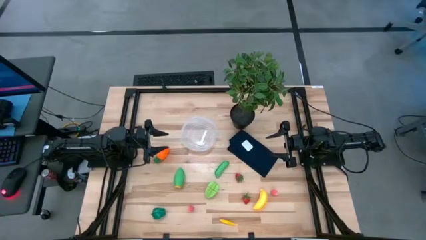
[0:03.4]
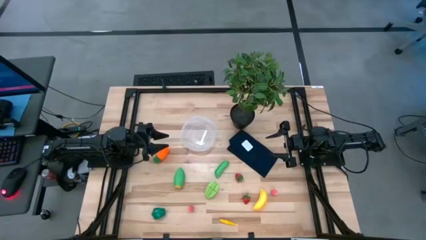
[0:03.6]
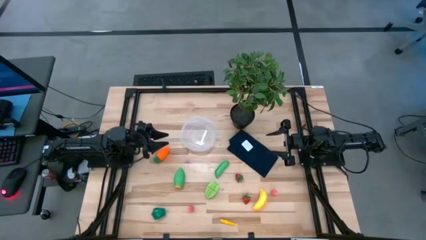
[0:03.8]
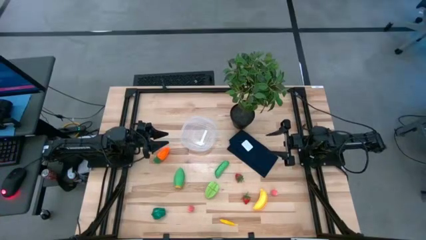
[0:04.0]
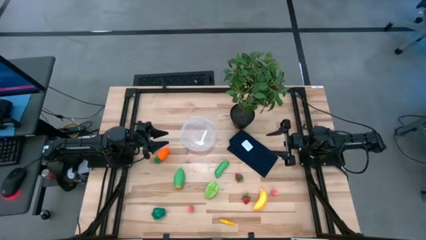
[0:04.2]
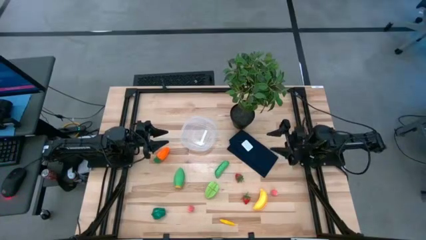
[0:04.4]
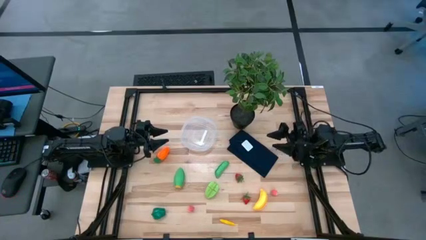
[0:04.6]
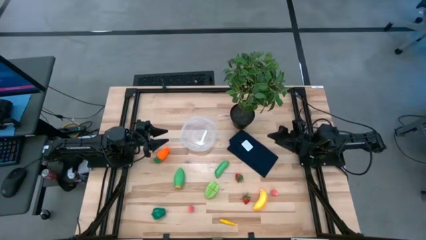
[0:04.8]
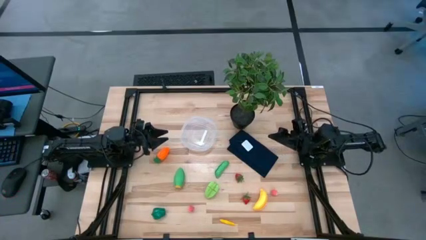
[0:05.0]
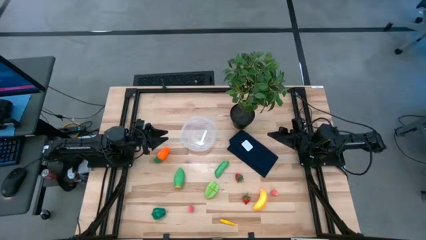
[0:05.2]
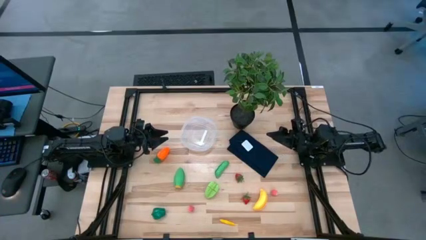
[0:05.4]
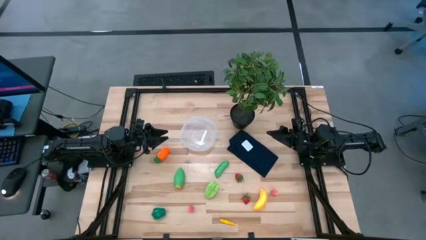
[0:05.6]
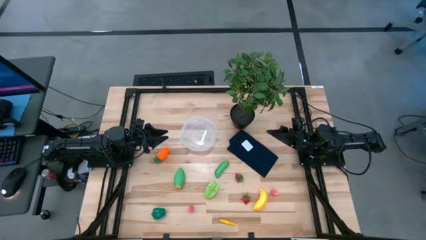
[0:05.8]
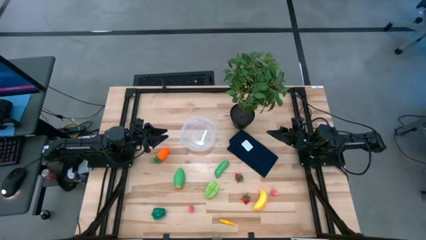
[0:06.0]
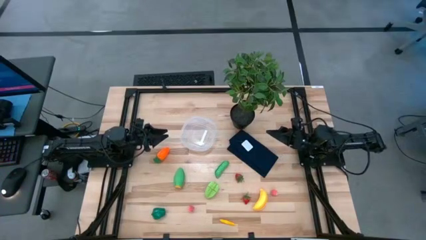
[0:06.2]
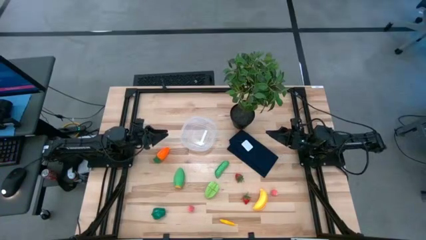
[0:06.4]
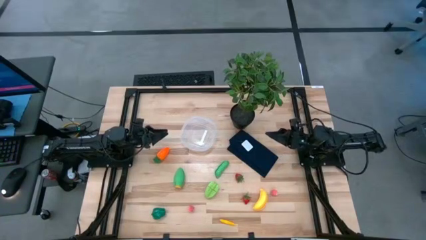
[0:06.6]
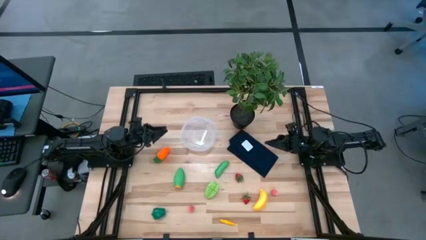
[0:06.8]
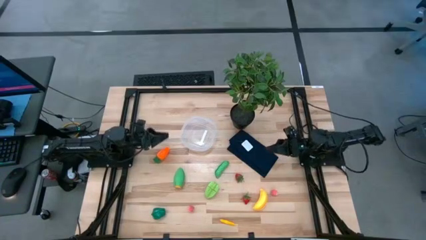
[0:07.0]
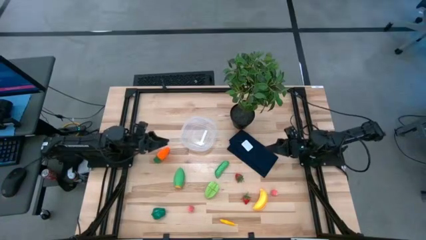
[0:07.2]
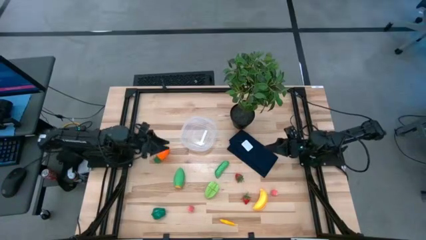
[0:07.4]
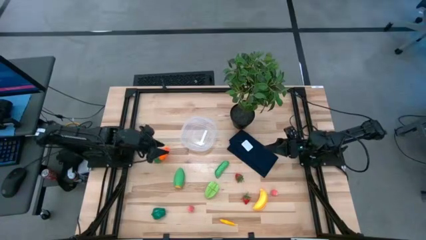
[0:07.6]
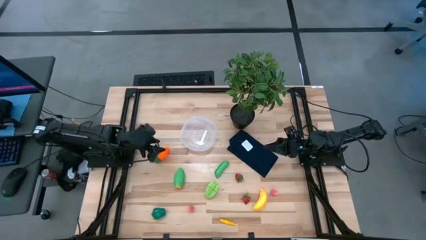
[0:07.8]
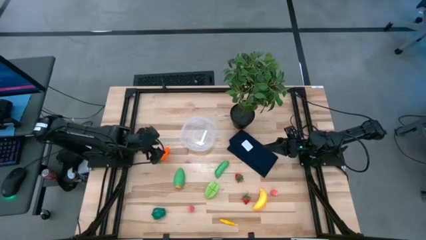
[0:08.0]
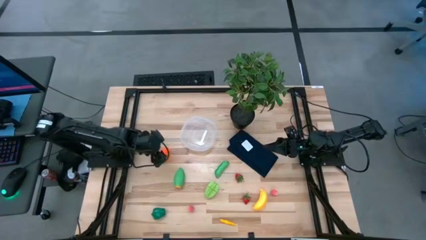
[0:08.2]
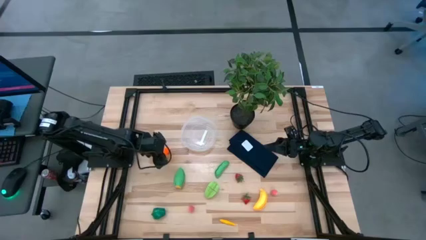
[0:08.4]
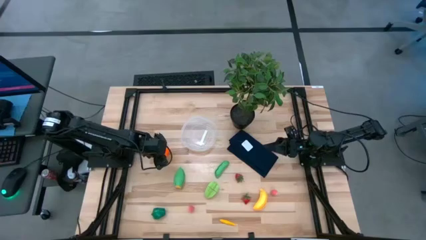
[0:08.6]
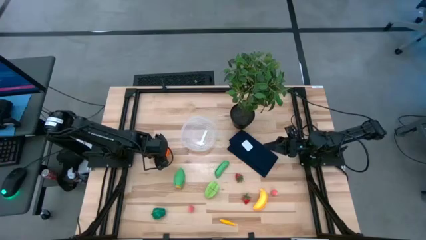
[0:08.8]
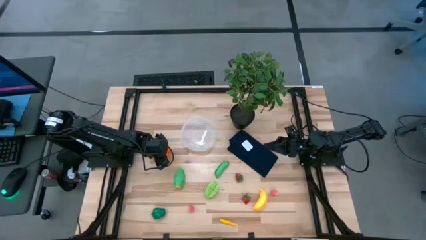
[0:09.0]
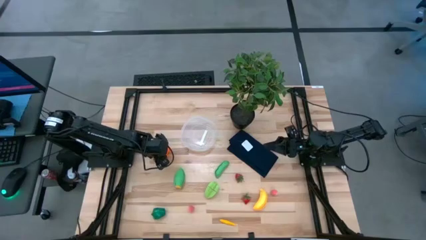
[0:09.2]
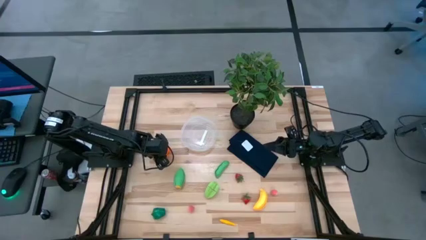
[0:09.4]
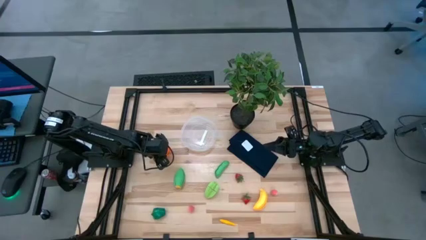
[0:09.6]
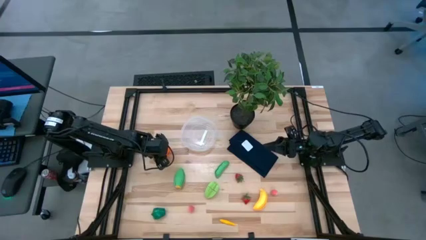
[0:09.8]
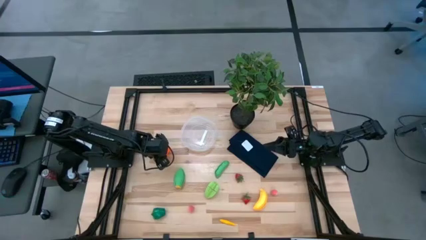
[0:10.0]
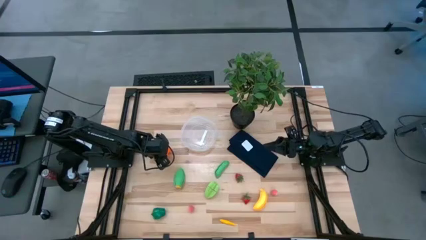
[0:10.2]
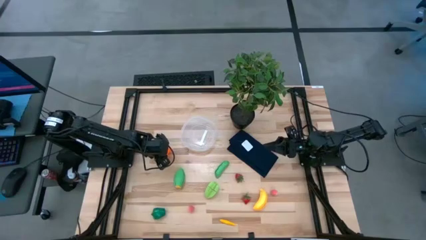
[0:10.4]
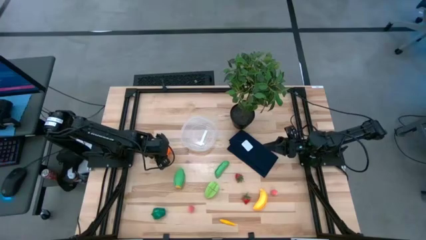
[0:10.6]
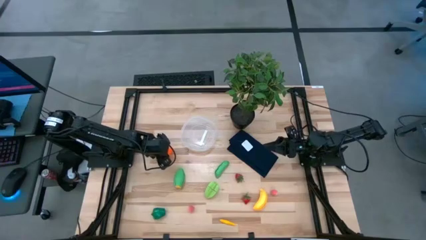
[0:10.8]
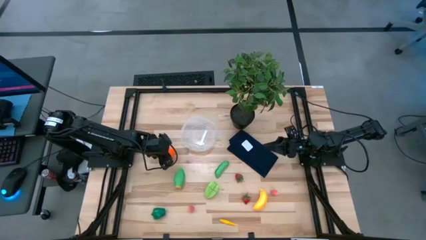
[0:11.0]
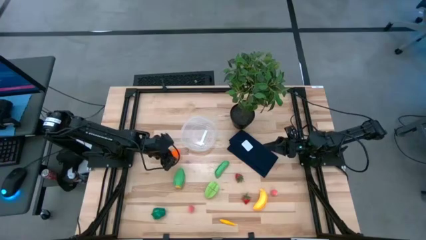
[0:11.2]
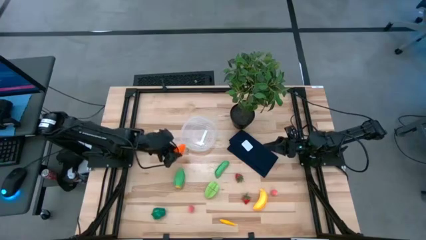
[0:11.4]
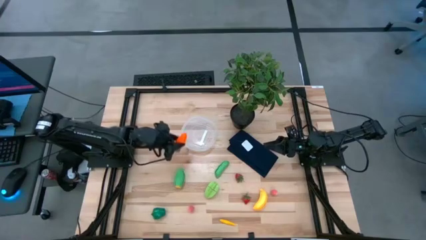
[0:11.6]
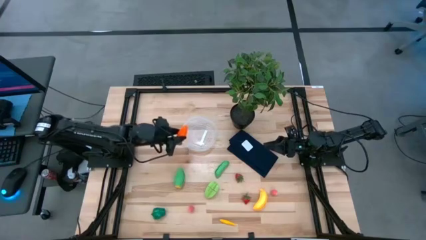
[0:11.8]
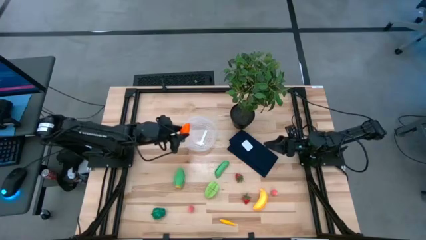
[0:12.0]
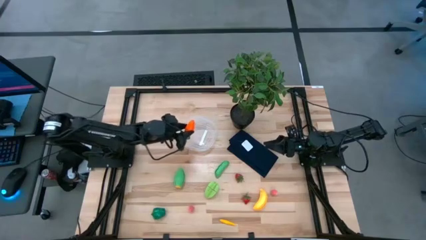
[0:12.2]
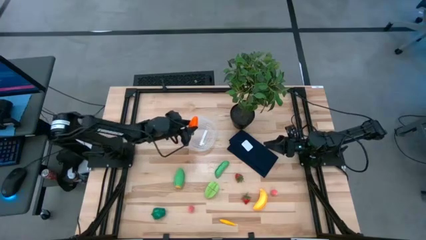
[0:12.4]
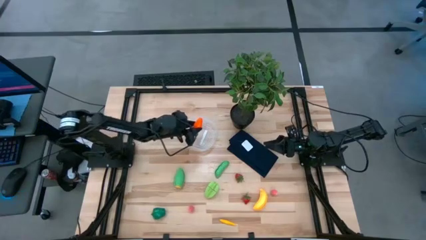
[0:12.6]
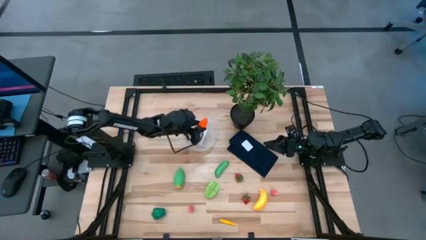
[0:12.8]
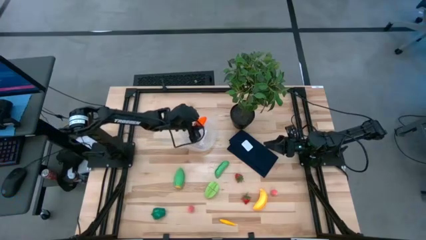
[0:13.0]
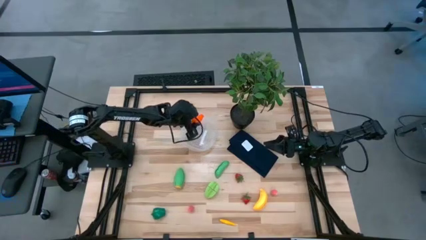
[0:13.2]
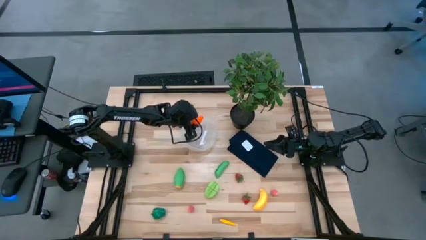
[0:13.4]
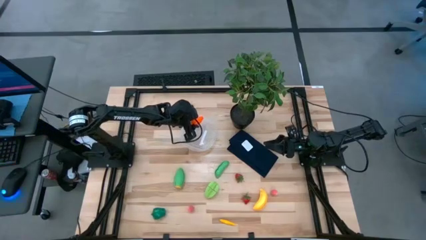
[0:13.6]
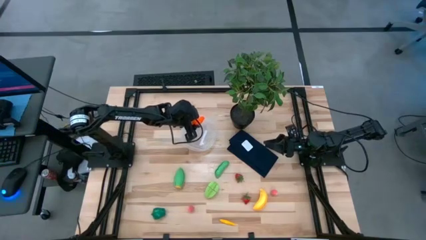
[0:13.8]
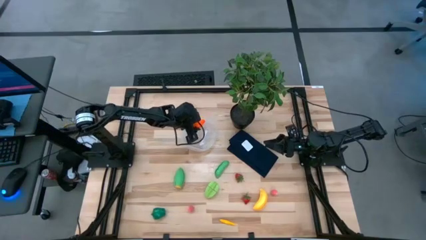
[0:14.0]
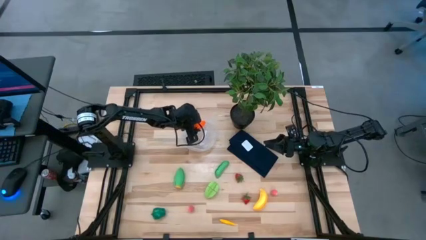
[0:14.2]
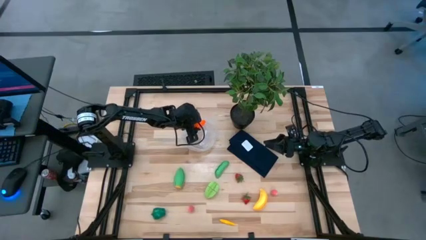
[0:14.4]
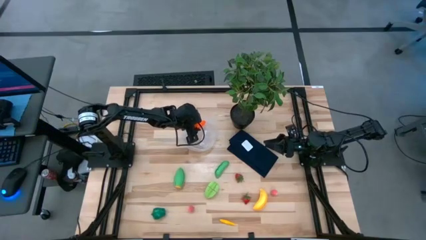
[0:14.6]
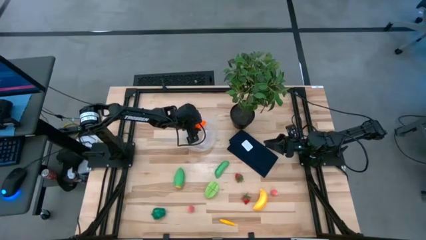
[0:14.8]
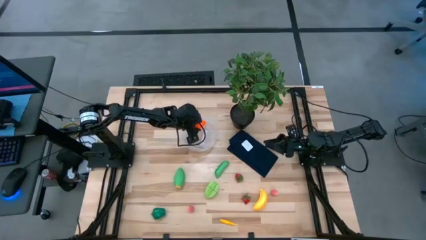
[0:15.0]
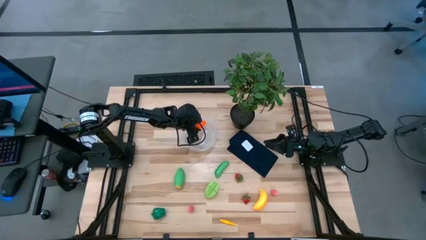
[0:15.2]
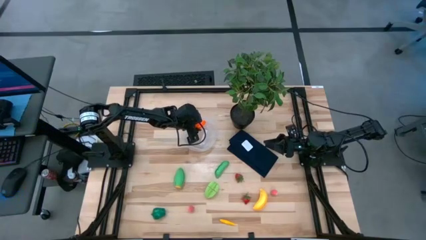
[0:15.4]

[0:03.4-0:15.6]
Task: Pick and placing Produce into tupperware
Put the orange carrot into the transparent bin

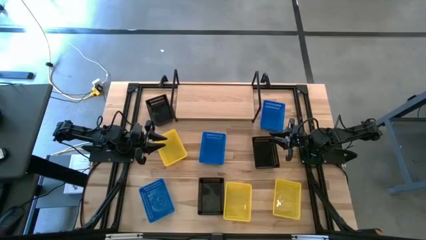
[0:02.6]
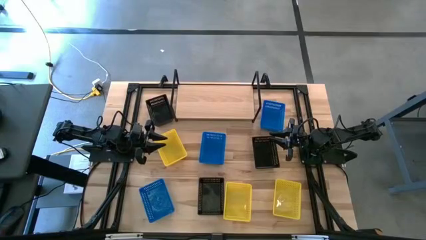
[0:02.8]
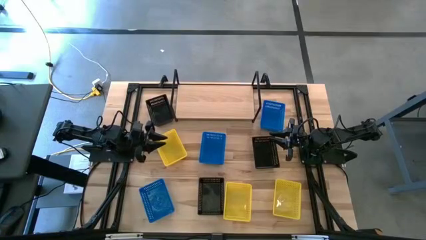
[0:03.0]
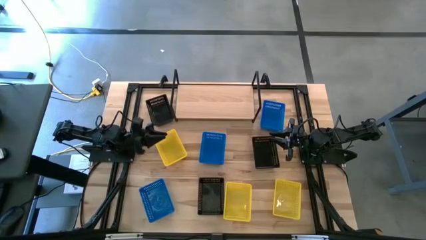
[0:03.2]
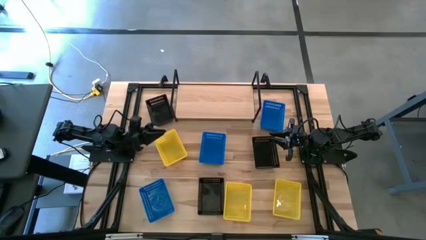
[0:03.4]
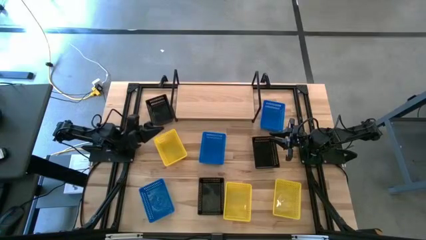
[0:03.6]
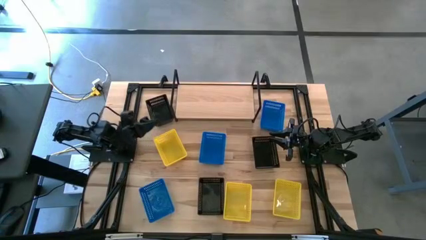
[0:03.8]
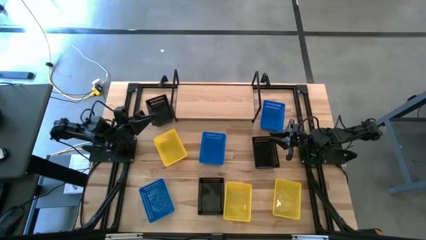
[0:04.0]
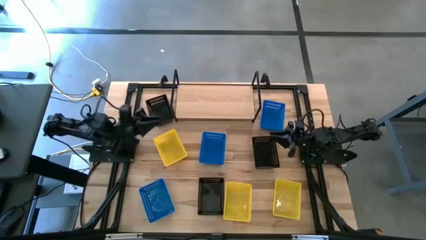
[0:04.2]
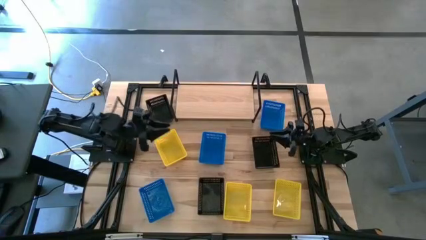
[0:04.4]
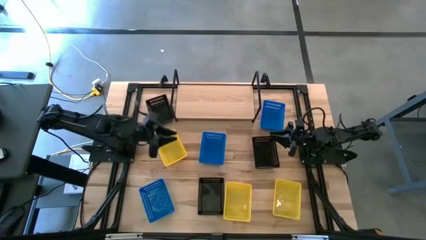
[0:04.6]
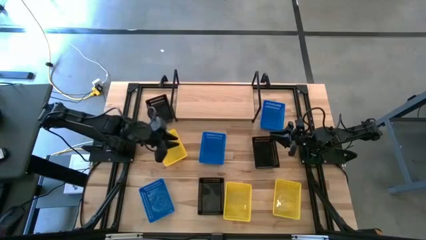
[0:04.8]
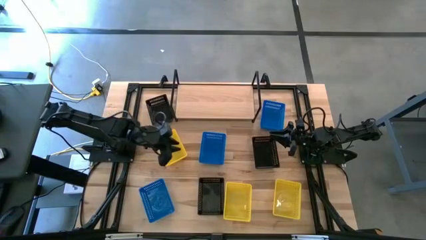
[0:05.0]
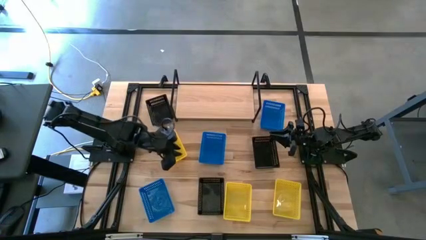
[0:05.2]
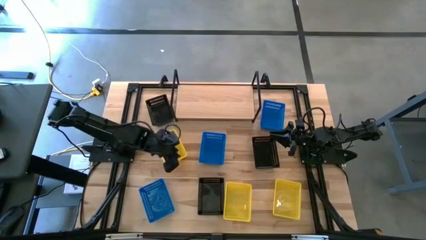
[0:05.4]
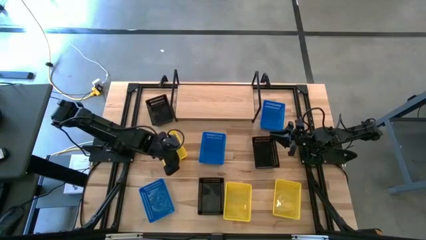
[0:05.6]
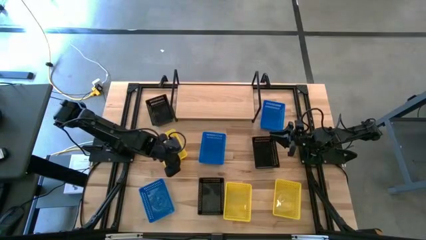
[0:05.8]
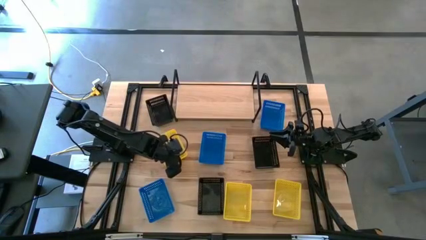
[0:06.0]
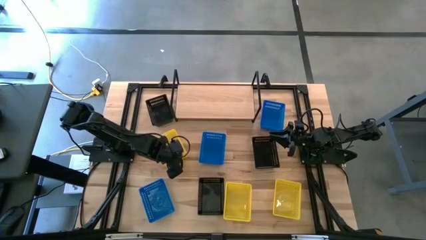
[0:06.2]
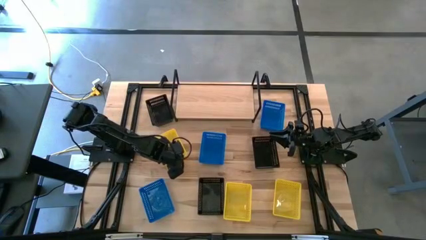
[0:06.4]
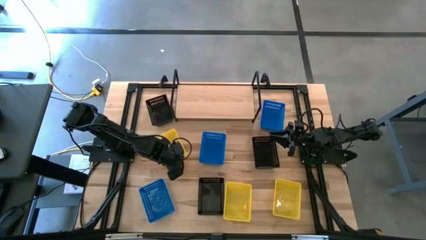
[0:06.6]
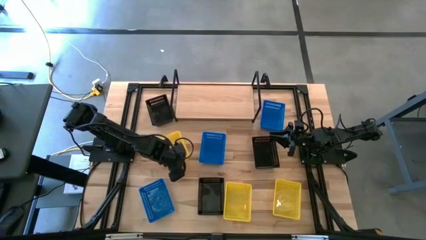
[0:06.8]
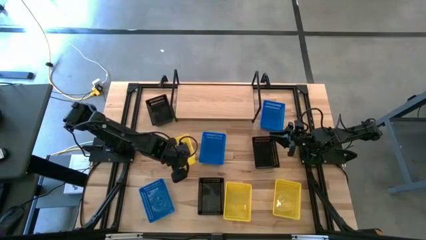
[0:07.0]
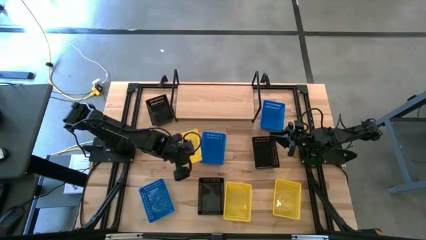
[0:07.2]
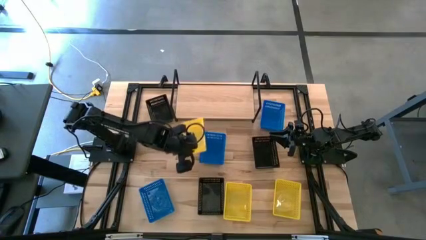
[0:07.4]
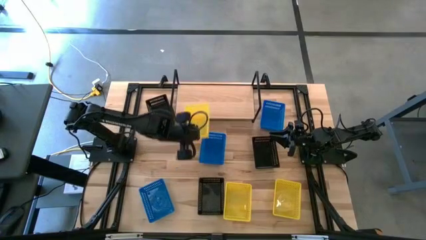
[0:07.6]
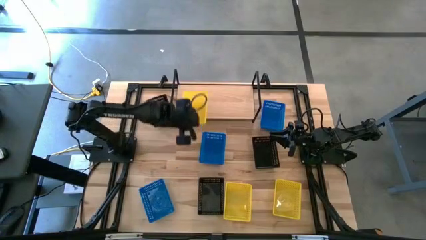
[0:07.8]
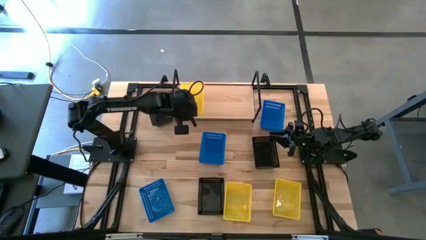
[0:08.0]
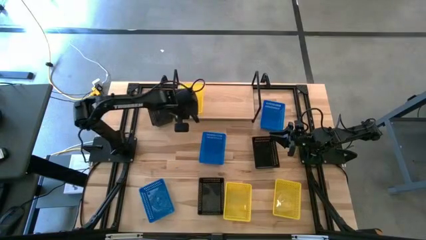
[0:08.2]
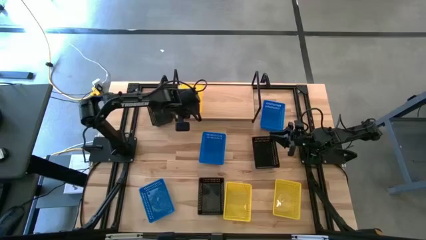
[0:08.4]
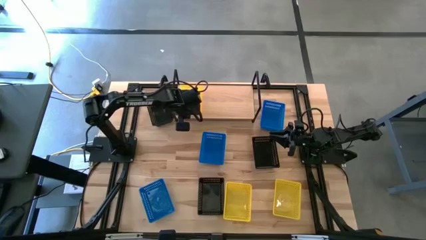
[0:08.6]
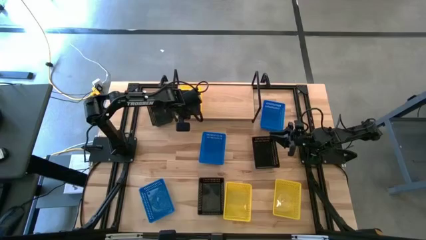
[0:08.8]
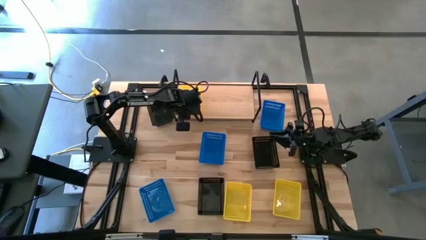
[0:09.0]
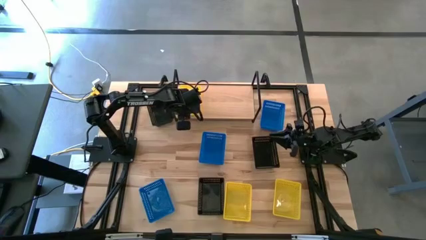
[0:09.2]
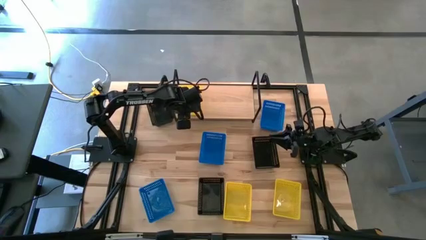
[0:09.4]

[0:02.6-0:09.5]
Task: Stack baskets on shelf by color
Put the top yellow bin on the shelf
